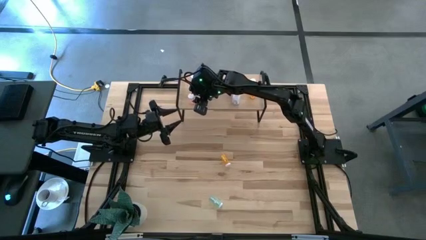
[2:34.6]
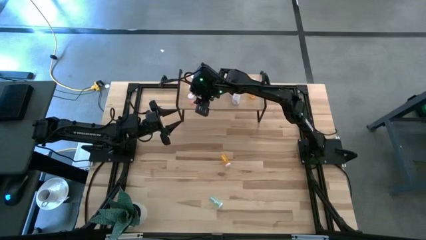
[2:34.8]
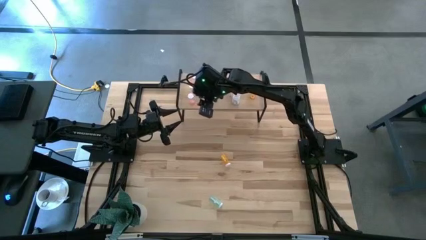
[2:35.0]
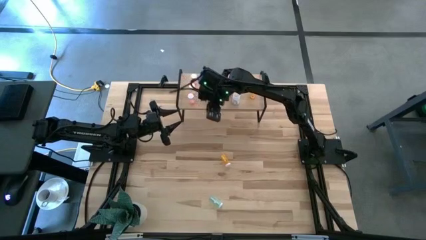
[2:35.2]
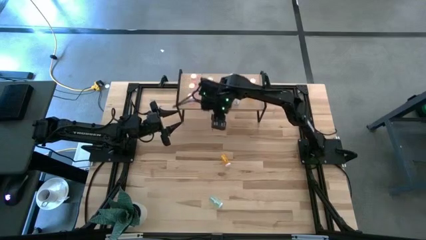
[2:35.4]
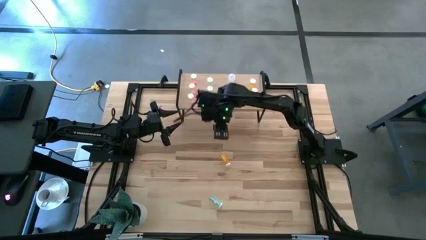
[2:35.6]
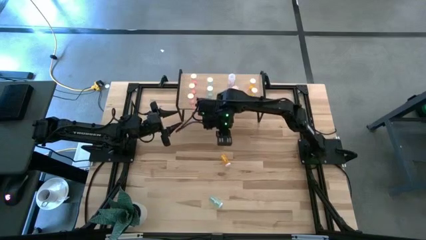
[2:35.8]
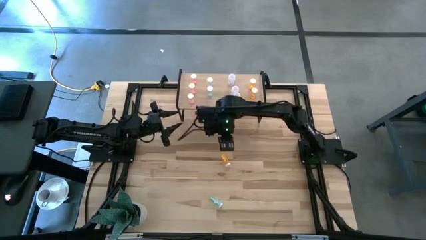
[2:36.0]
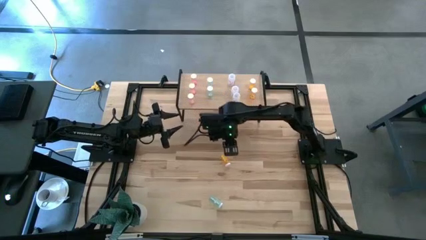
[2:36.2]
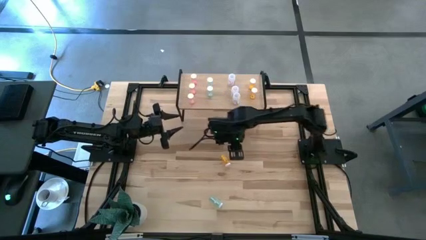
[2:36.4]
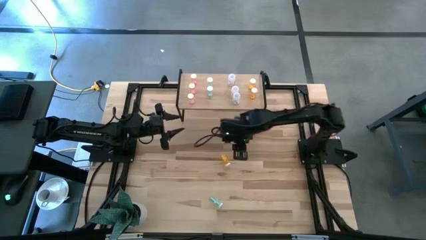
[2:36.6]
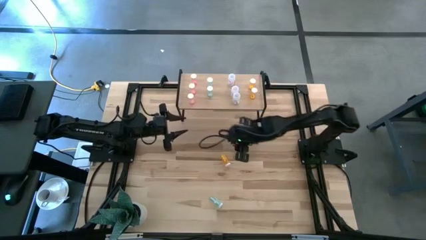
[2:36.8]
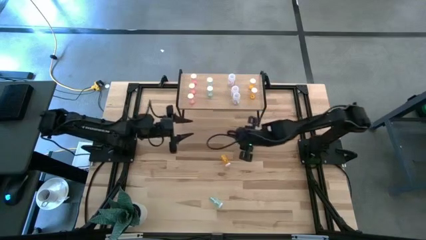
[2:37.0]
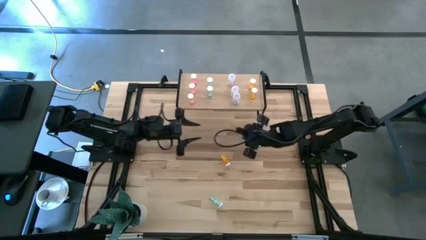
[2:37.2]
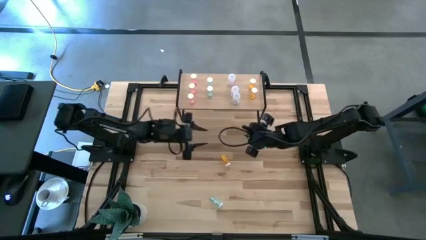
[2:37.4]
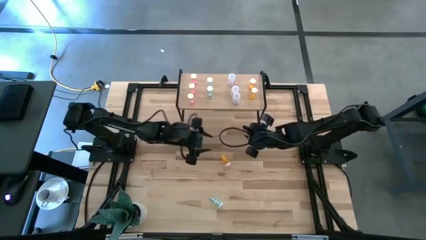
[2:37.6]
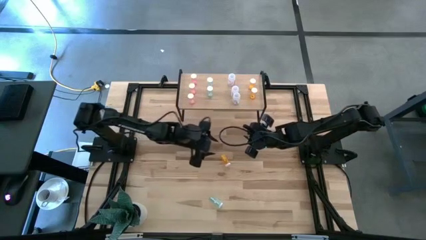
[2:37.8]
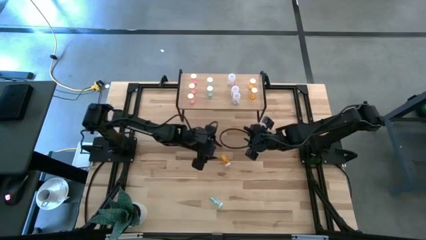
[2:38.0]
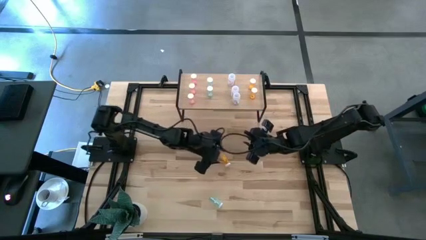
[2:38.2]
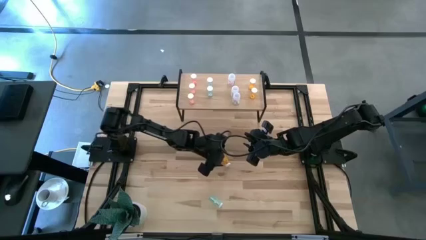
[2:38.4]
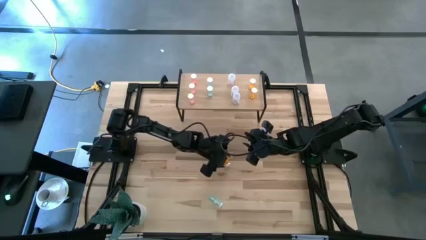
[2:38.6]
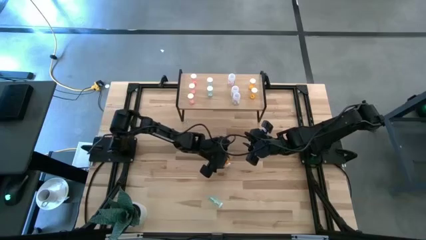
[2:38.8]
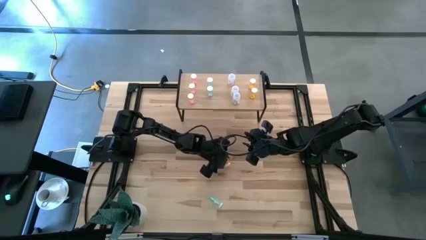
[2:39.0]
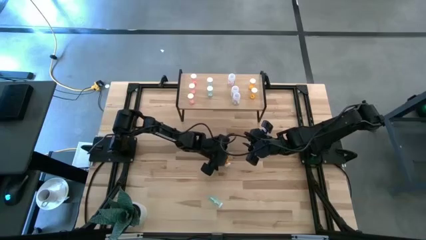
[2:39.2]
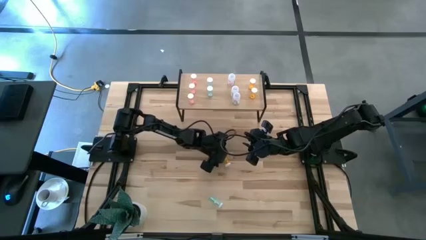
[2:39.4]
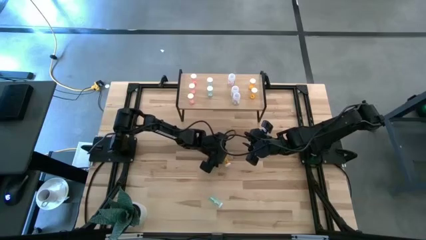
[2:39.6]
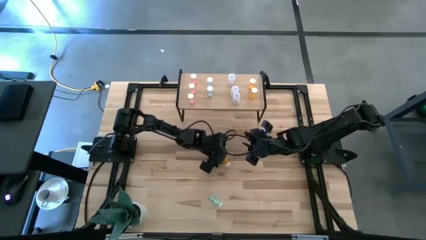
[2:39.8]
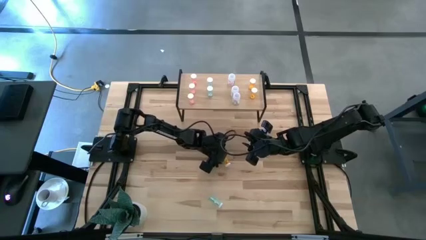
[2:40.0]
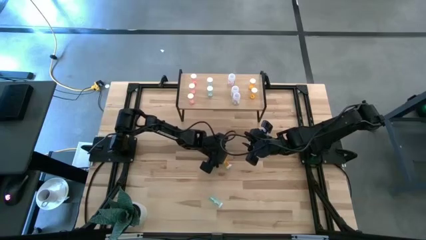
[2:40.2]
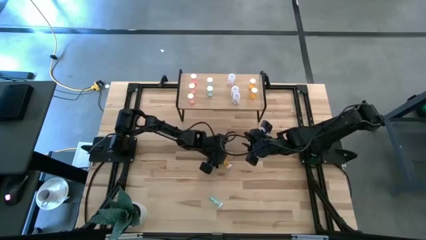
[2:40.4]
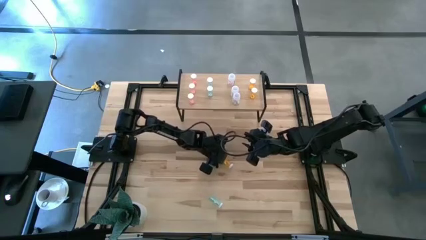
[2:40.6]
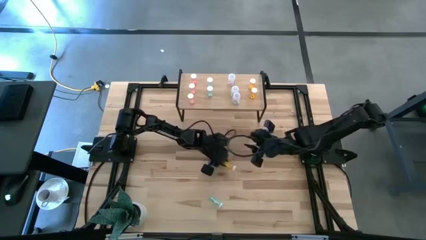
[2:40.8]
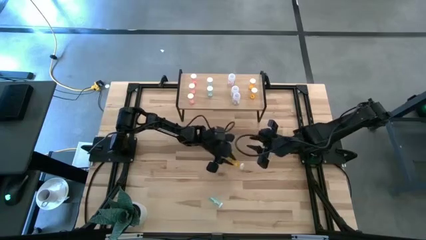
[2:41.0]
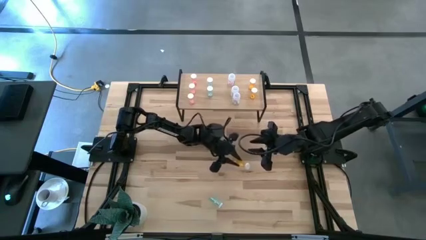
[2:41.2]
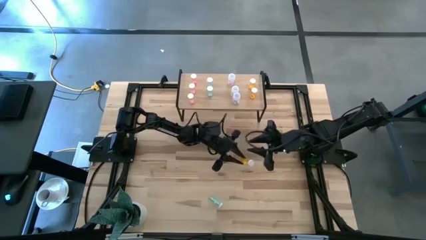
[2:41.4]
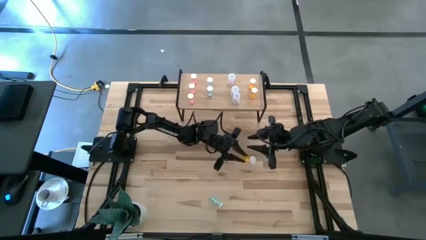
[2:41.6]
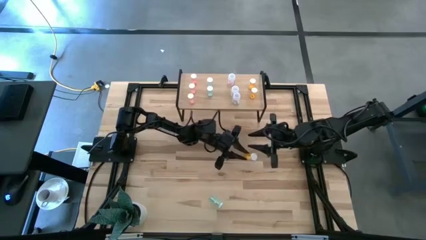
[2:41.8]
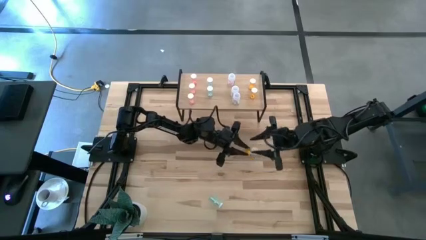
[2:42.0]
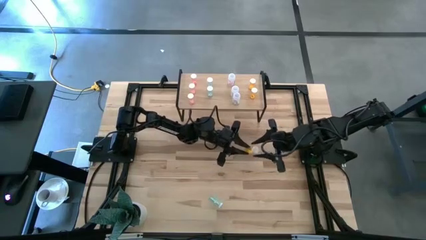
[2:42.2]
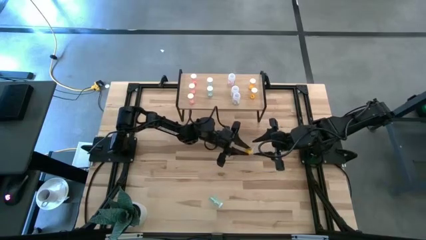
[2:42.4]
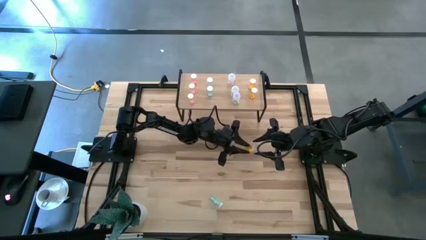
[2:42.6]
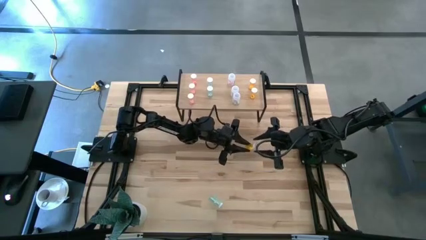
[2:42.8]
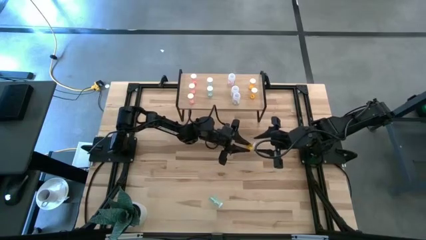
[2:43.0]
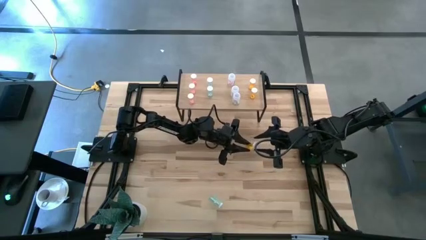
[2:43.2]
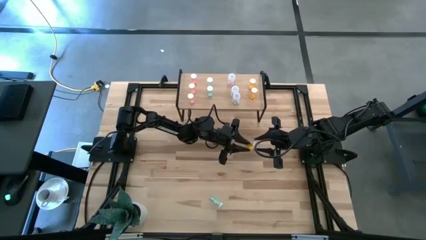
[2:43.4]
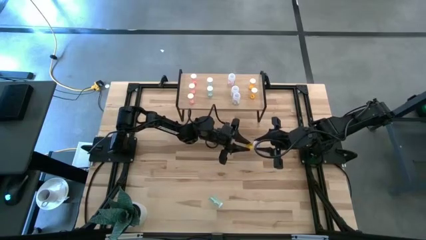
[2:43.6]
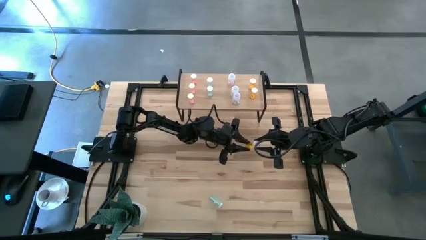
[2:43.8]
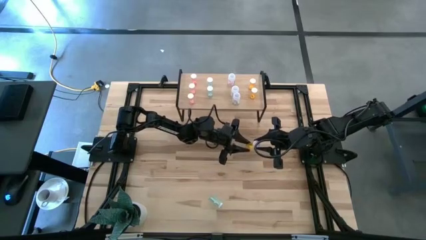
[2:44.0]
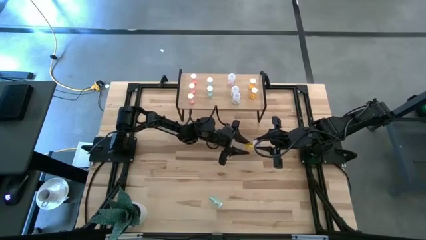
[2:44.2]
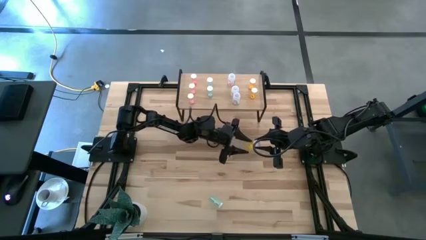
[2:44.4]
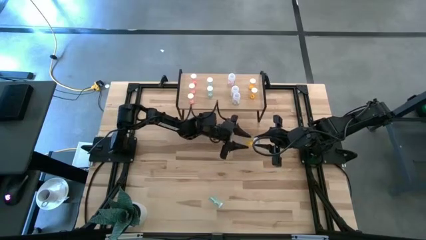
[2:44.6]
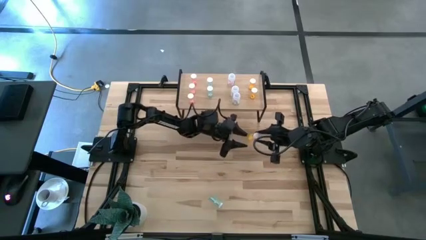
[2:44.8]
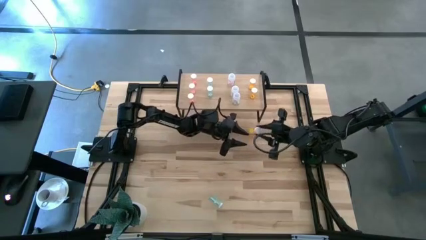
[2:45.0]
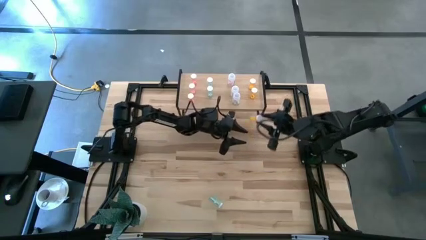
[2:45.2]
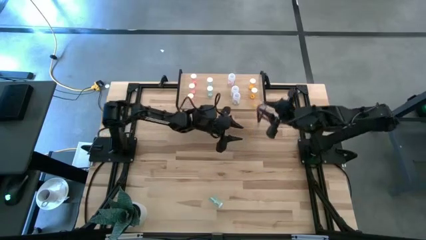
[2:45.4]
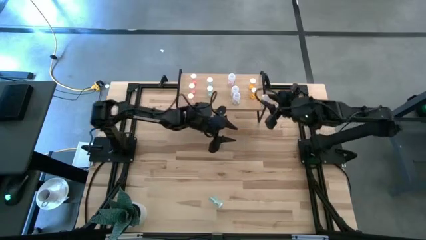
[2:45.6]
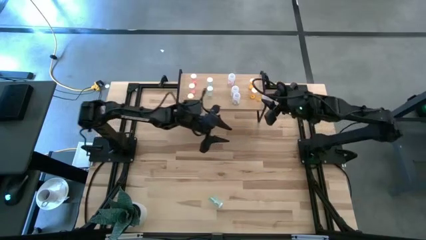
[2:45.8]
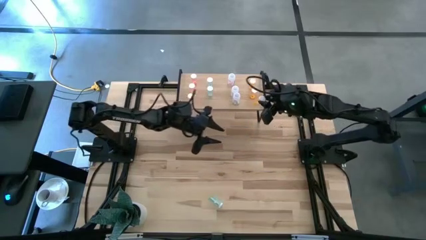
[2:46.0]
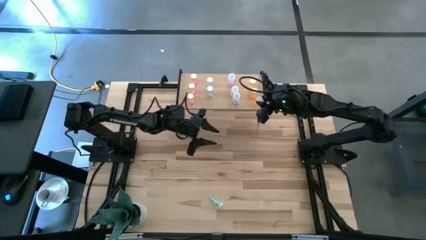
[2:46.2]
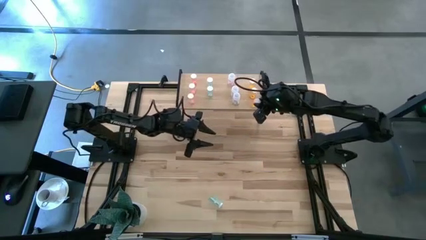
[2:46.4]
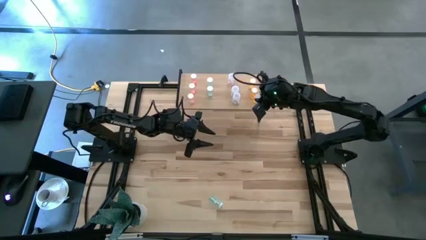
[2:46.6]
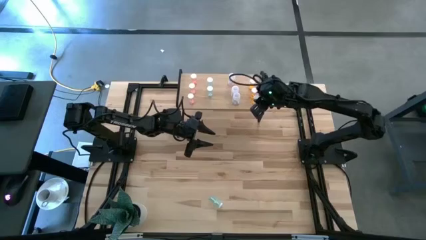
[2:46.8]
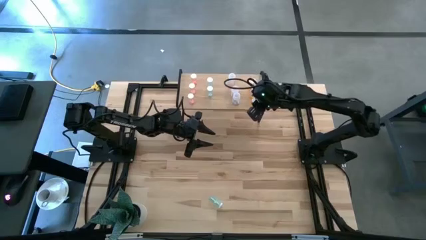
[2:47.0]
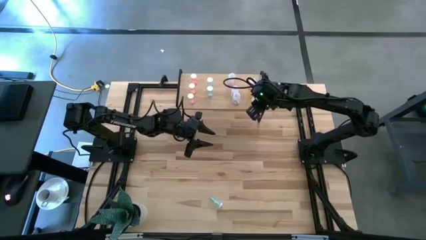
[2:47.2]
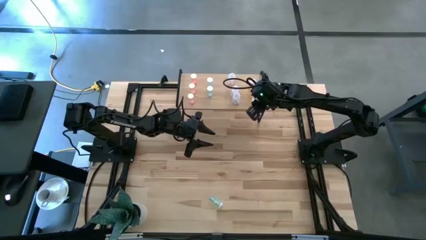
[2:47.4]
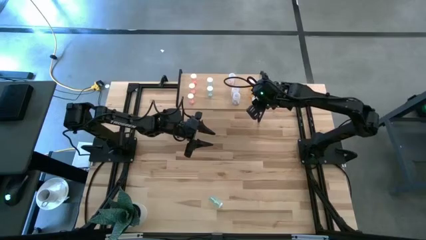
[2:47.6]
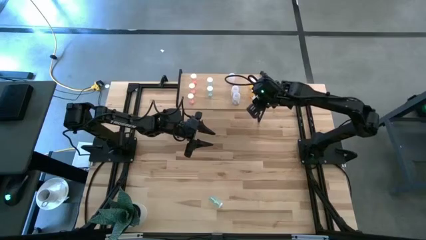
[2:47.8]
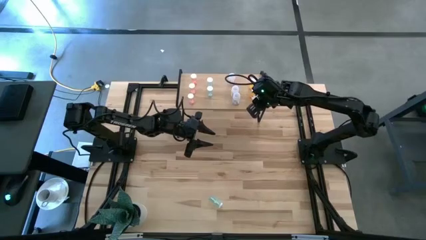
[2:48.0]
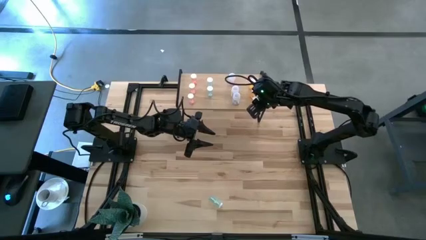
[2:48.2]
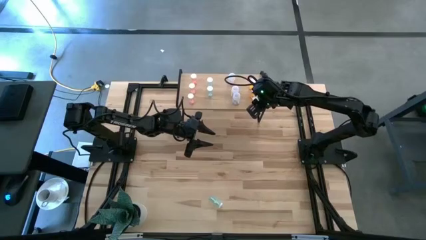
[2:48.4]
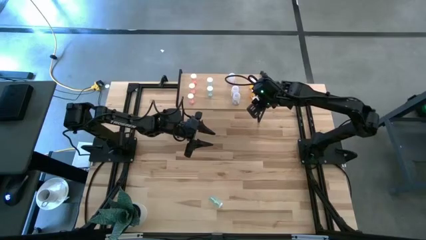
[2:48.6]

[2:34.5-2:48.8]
Task: Pick and place medicine bottles onto shelf by color
Put the orange pill bottle on the shelf aligned with the other orange pill bottles
